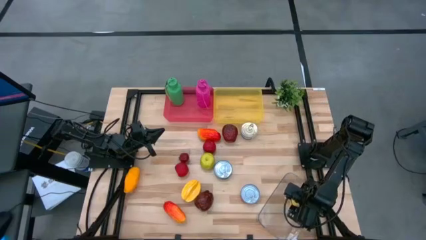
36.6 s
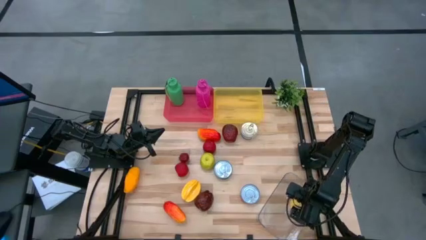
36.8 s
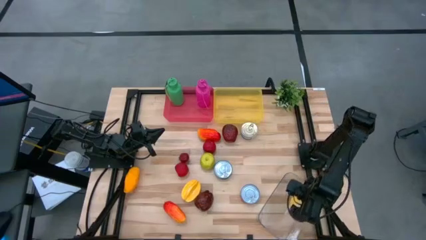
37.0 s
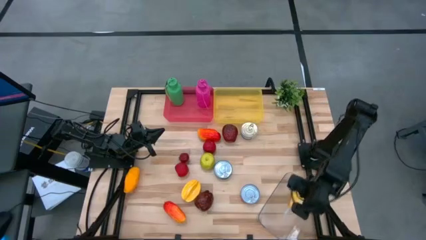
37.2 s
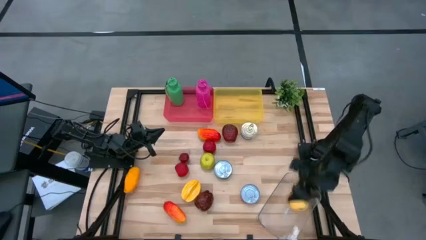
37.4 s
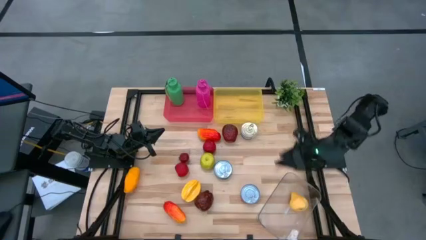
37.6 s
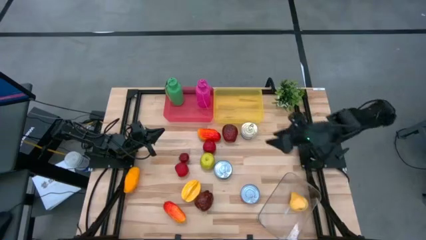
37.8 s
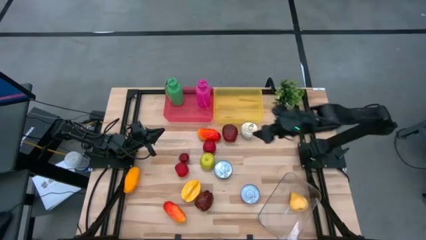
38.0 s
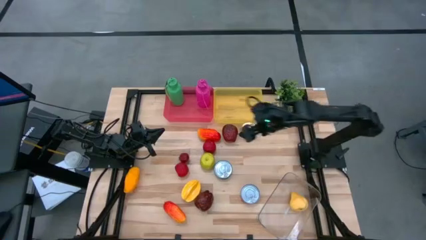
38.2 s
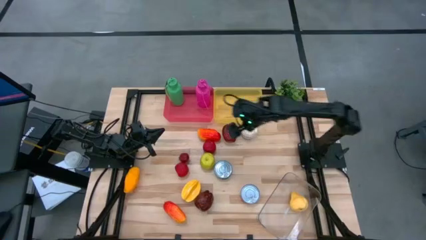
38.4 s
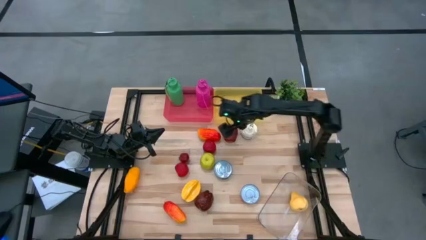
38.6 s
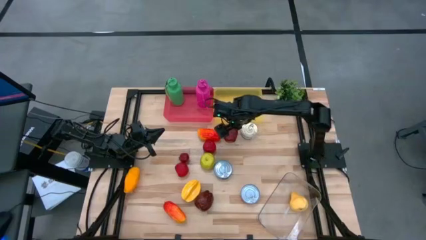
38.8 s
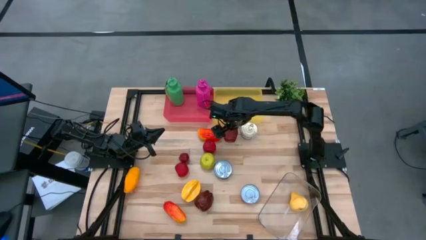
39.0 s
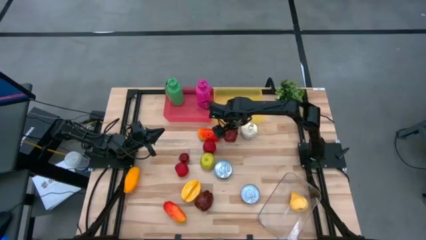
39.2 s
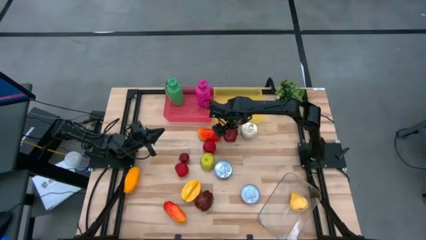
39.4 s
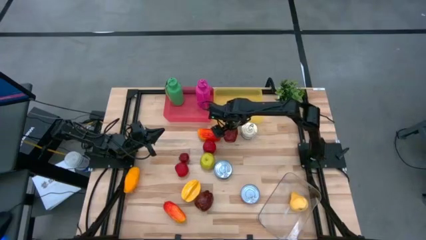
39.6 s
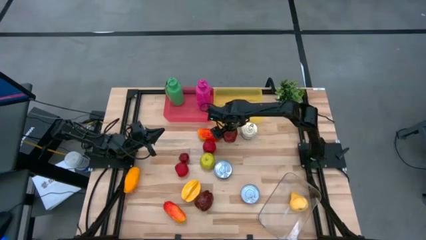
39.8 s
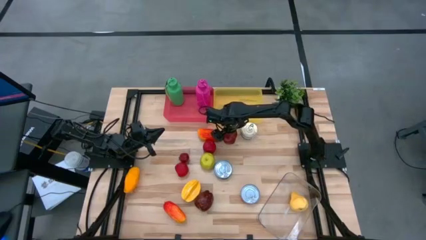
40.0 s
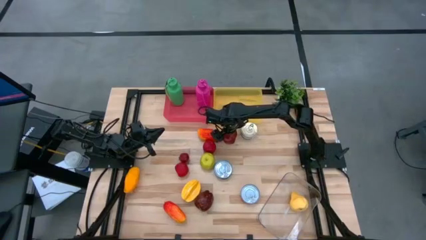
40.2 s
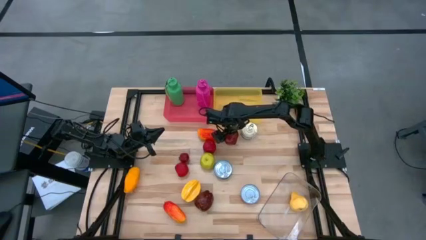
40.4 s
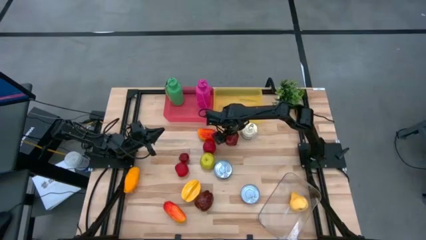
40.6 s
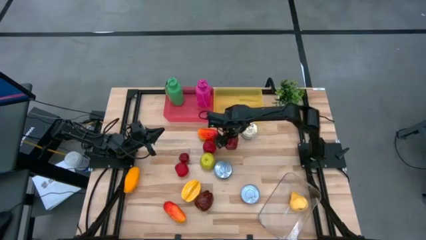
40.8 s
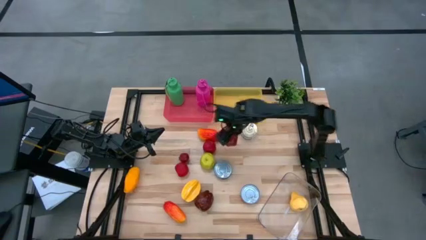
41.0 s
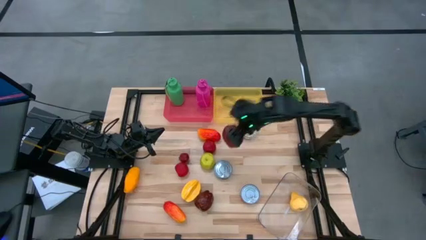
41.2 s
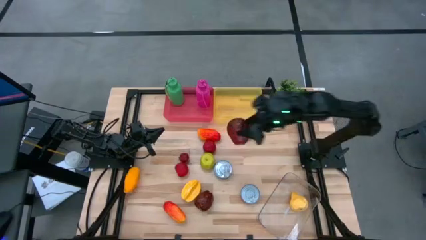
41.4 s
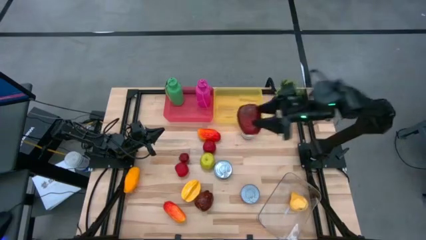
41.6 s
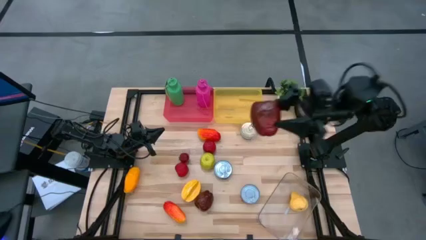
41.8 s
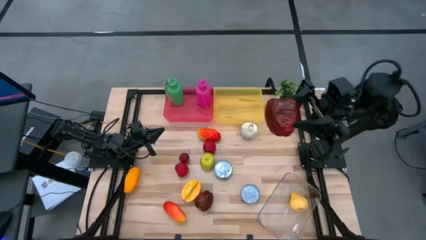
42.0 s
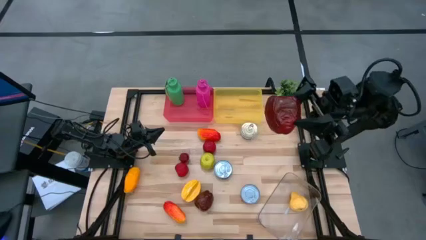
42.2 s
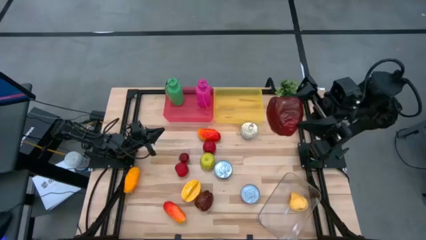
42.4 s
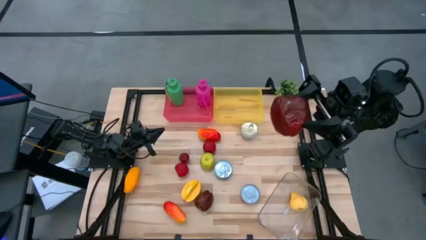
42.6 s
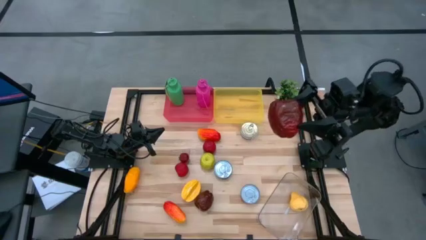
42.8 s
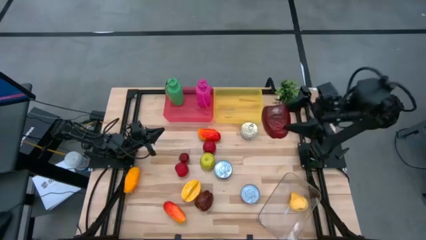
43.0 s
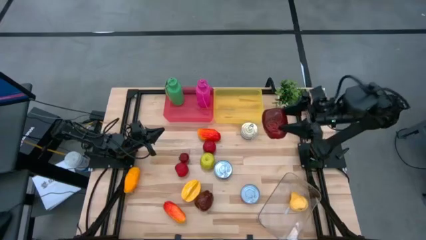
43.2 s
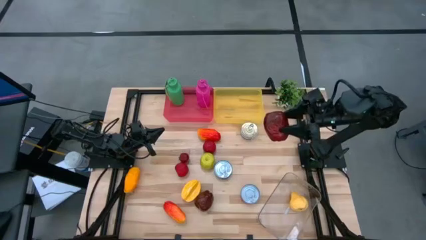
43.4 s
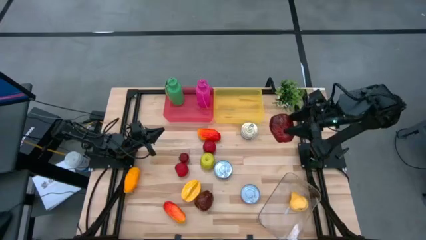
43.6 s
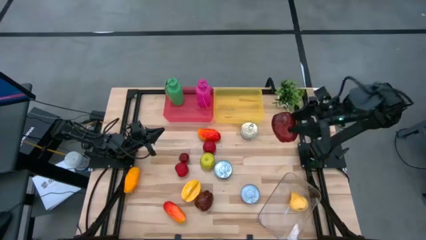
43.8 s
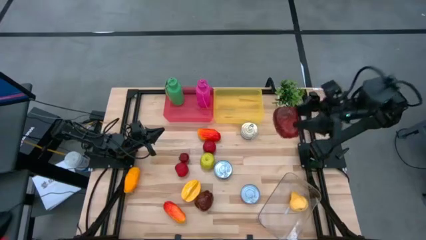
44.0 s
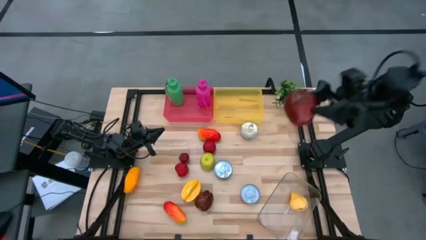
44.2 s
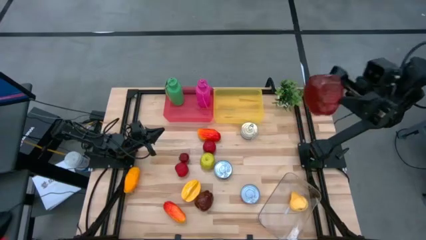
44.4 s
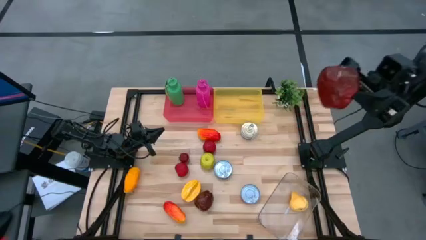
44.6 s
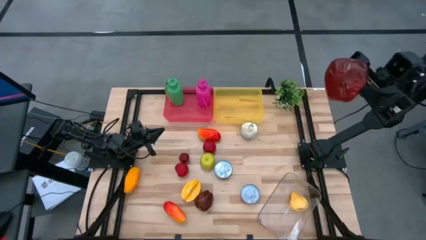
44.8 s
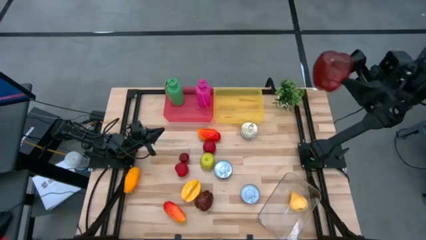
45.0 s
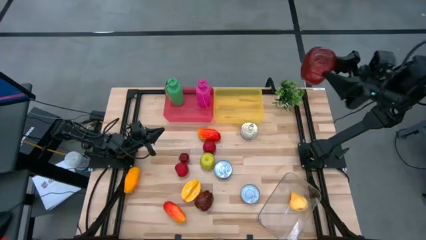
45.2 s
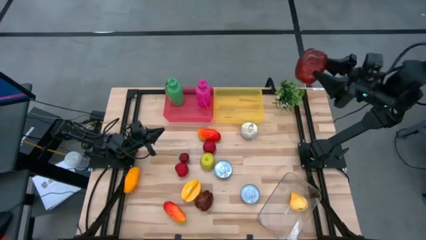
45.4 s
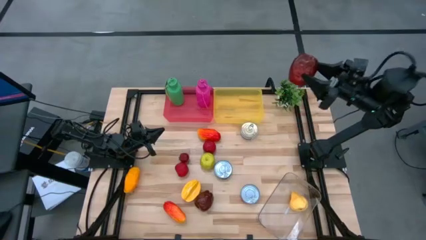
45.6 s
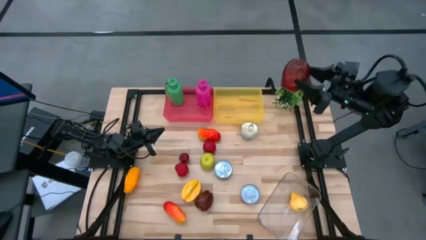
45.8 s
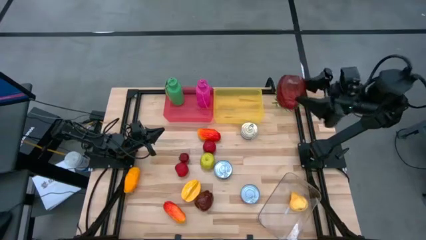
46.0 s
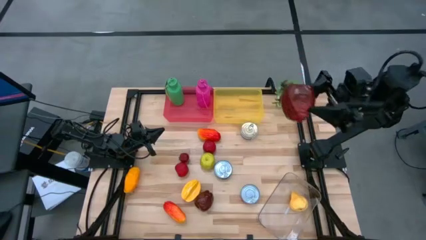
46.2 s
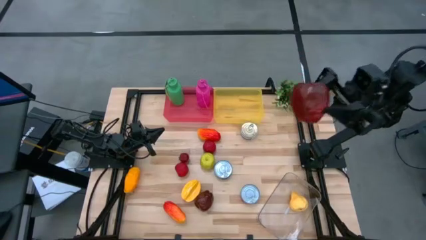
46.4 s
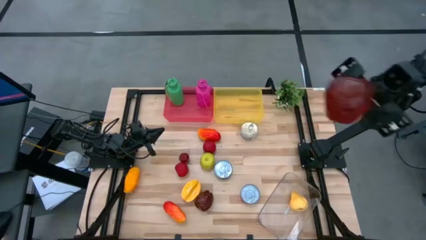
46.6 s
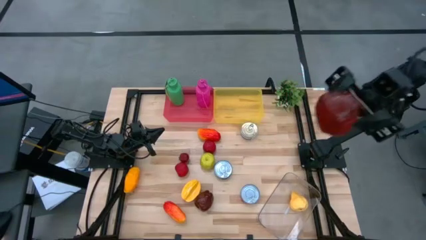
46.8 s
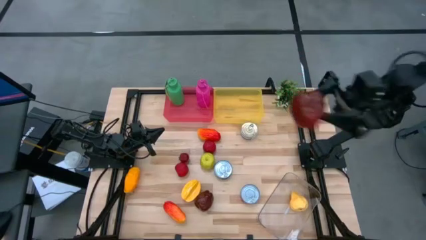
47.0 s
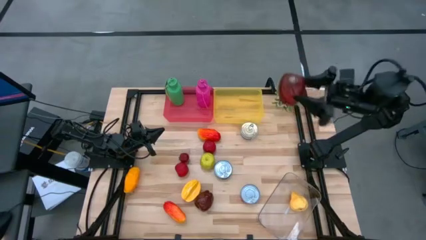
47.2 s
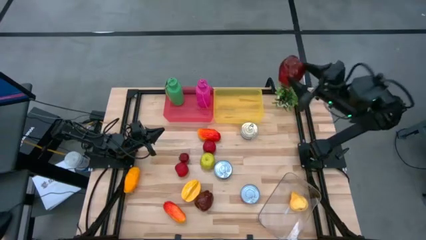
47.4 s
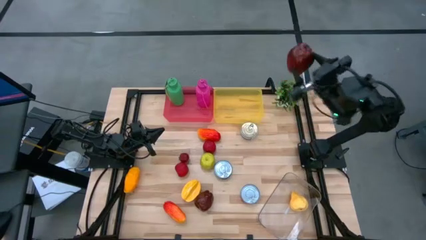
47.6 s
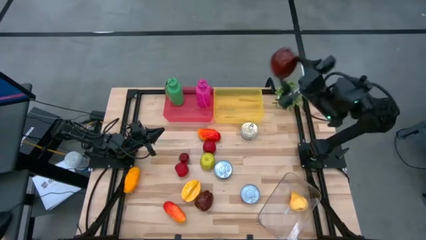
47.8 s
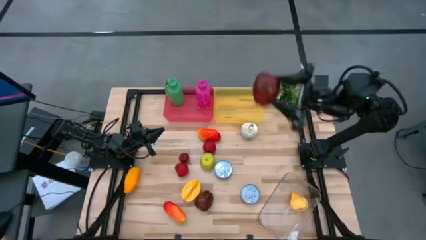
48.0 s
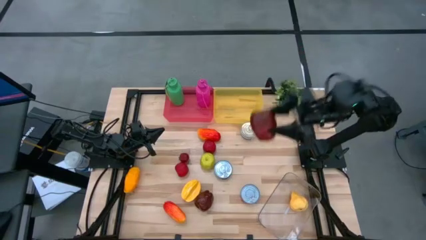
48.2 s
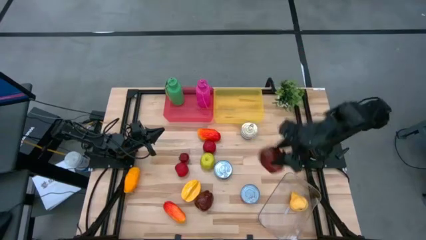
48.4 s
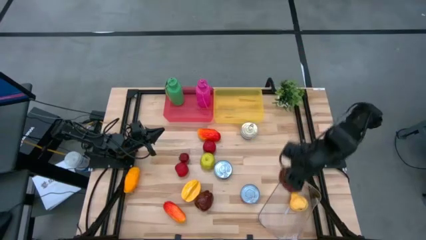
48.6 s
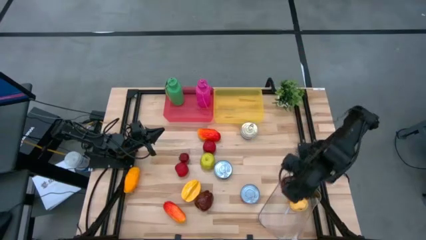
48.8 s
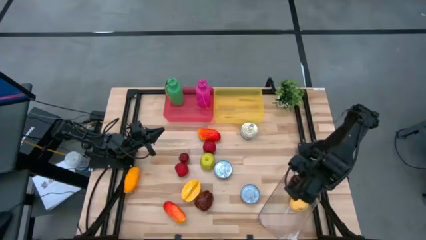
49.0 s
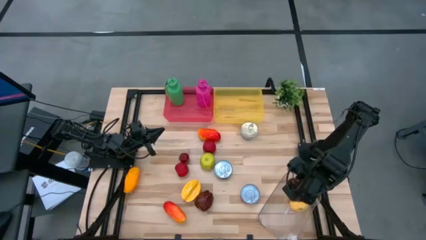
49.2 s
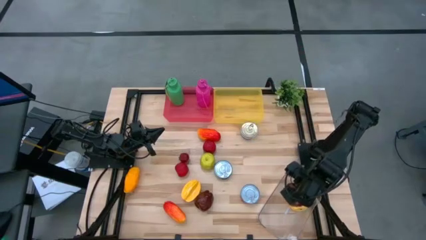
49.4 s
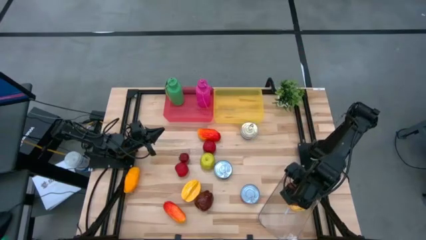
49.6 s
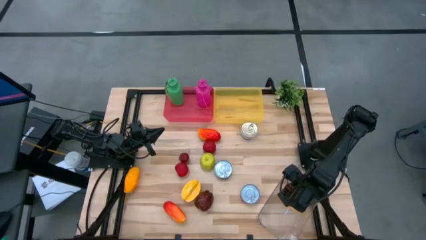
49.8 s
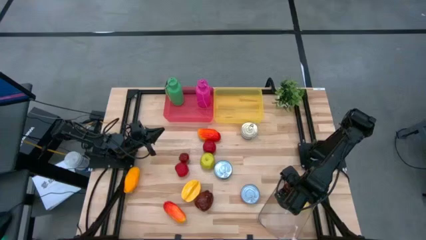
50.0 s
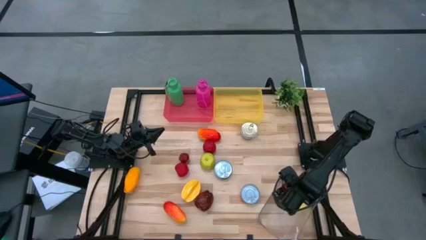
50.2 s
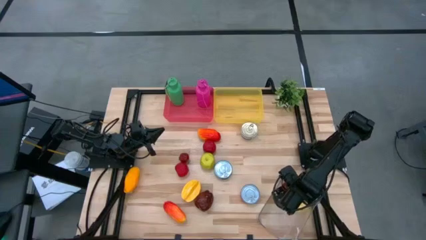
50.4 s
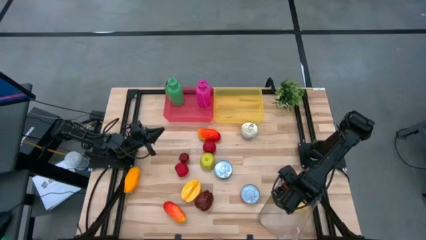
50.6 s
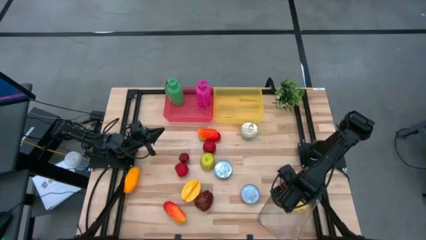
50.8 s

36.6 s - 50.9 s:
Task: Pick & Place Food Item
Put the apple into the transparent bin
